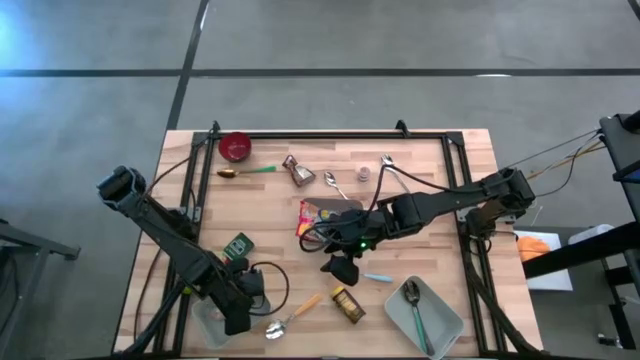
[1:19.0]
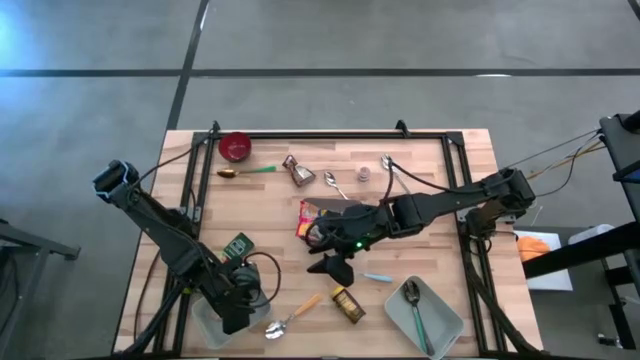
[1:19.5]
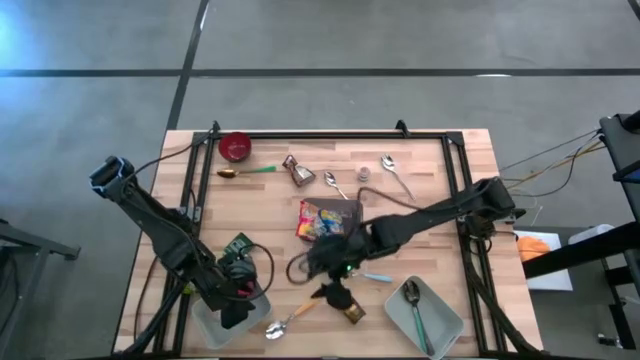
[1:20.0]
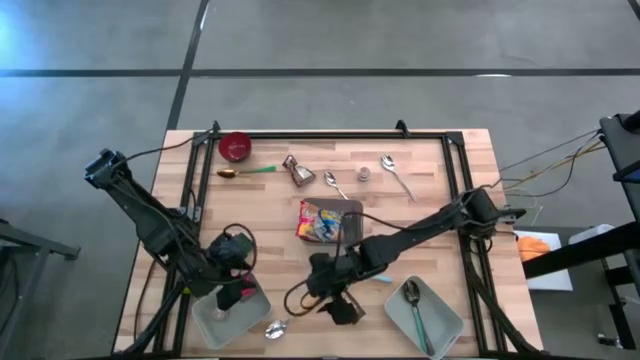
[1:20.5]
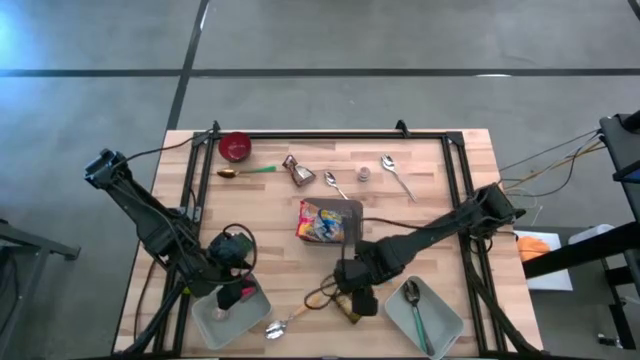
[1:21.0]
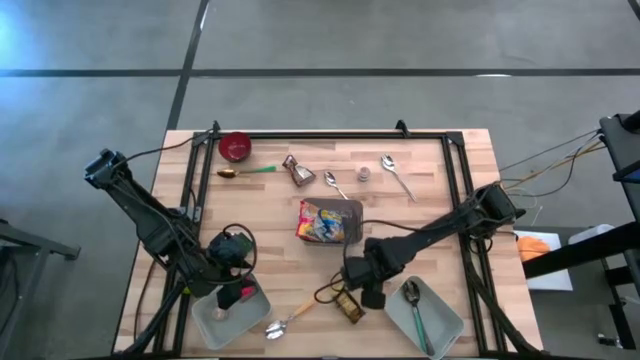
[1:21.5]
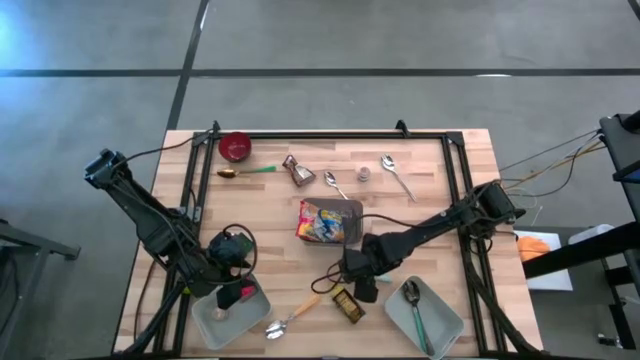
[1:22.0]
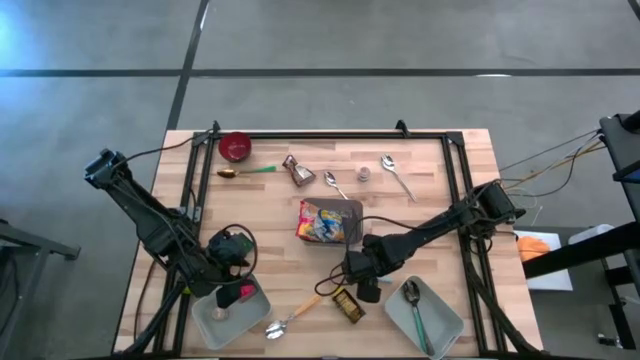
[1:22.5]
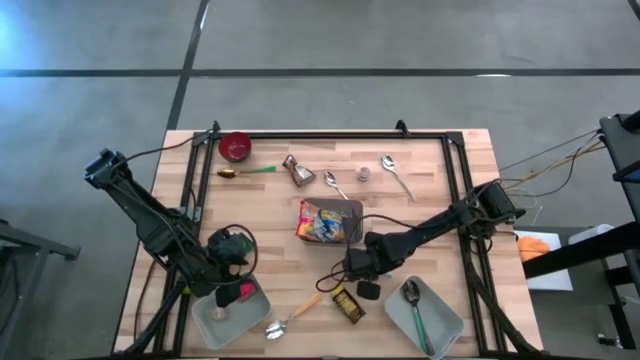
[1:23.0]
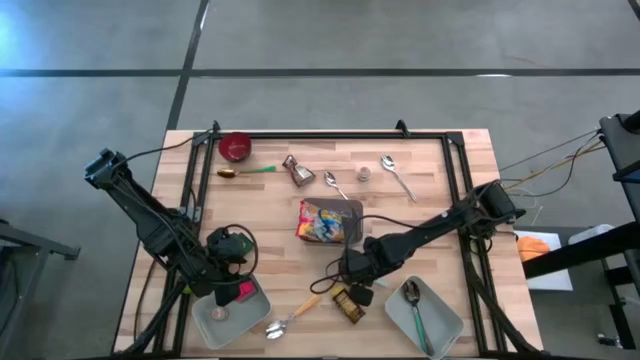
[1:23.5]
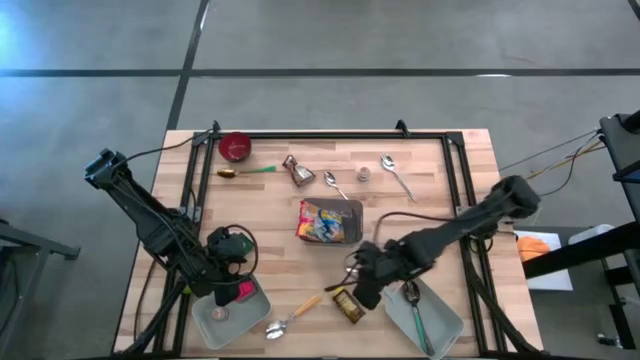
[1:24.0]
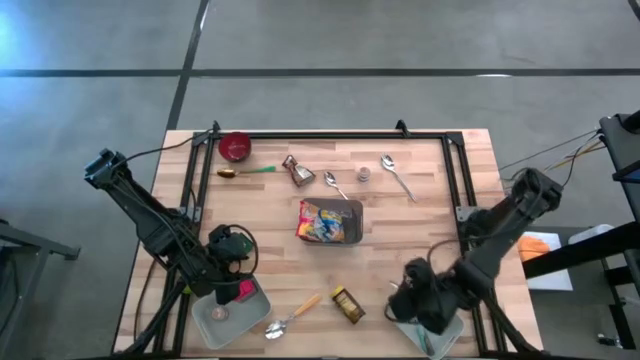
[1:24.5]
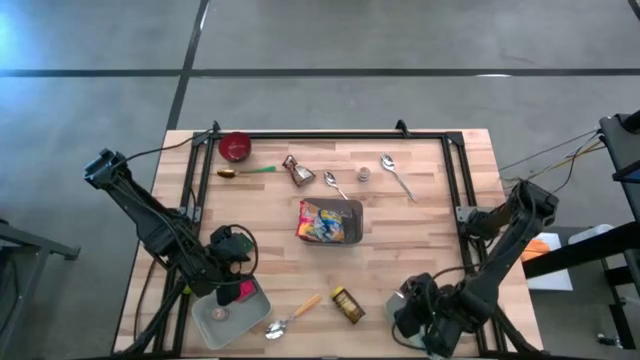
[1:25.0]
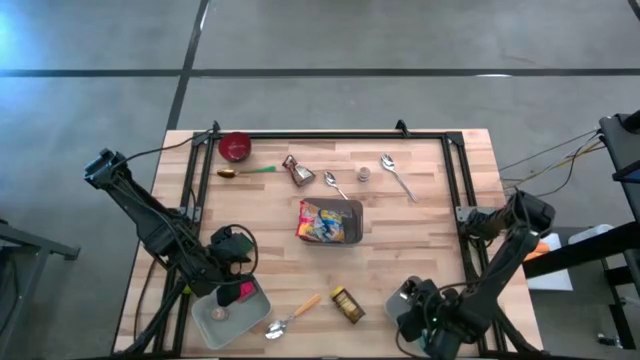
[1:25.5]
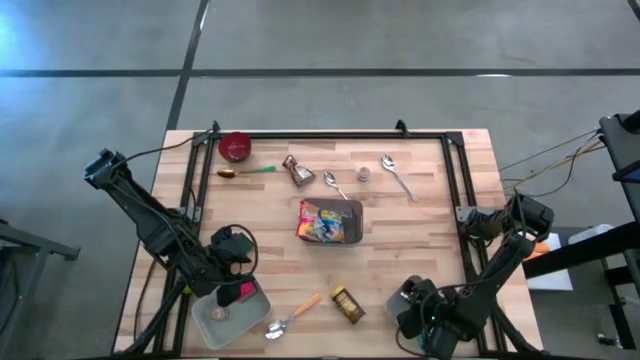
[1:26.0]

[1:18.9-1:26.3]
Put the light blue spoon into the right grey bin

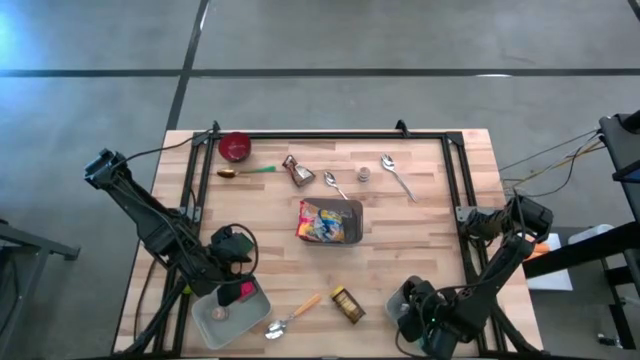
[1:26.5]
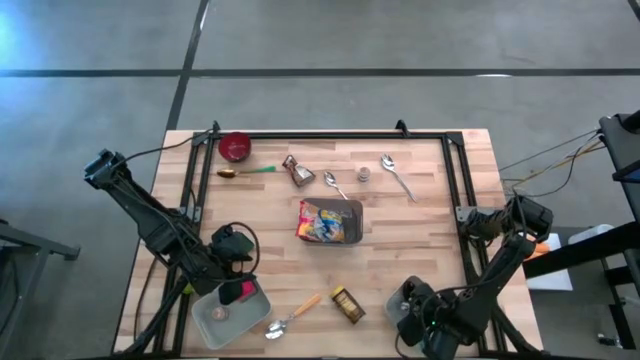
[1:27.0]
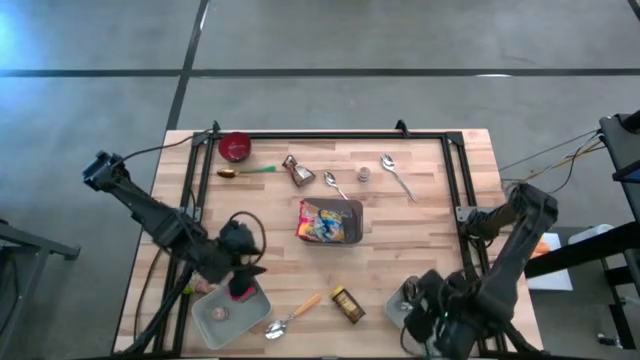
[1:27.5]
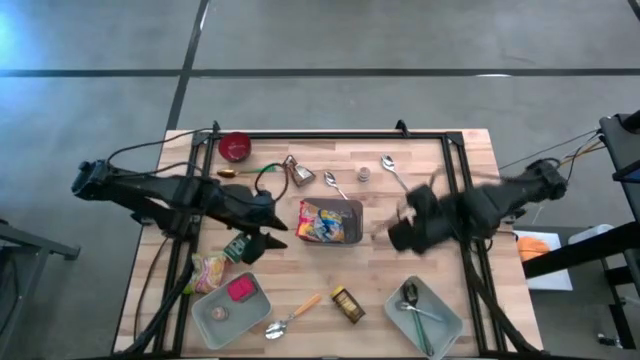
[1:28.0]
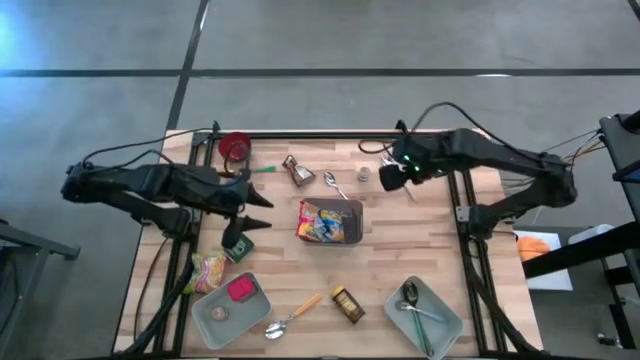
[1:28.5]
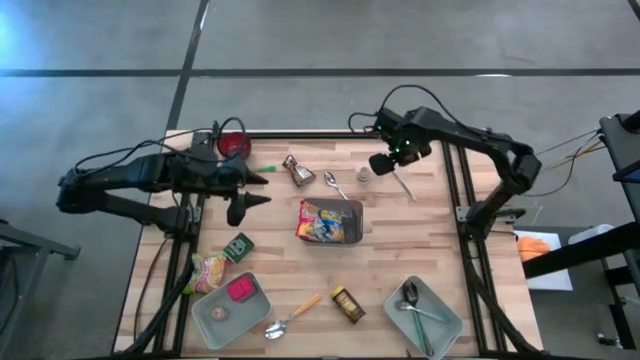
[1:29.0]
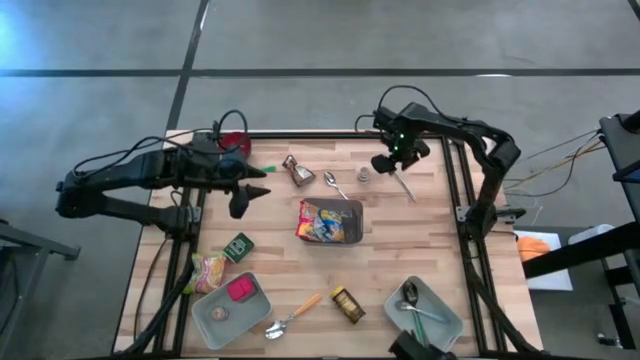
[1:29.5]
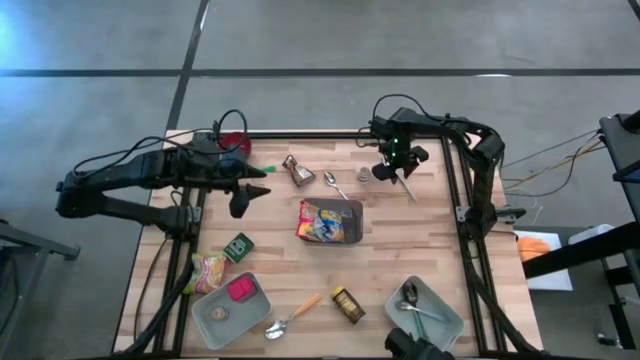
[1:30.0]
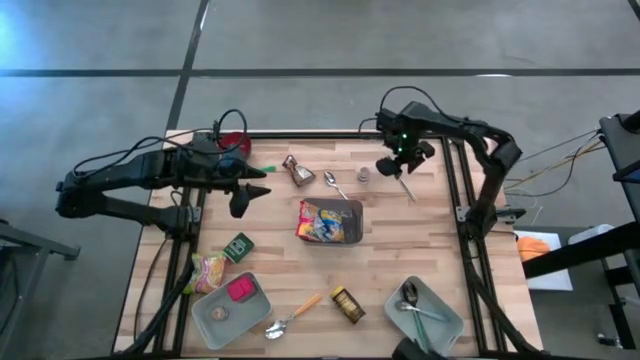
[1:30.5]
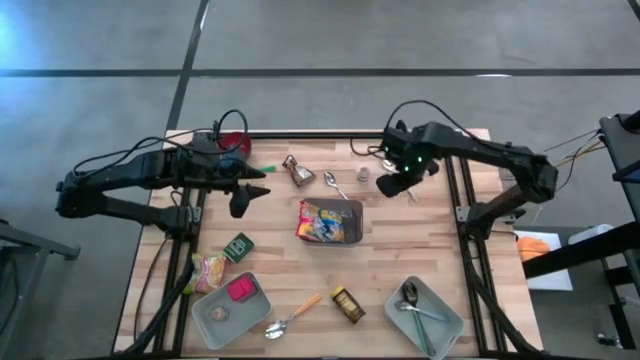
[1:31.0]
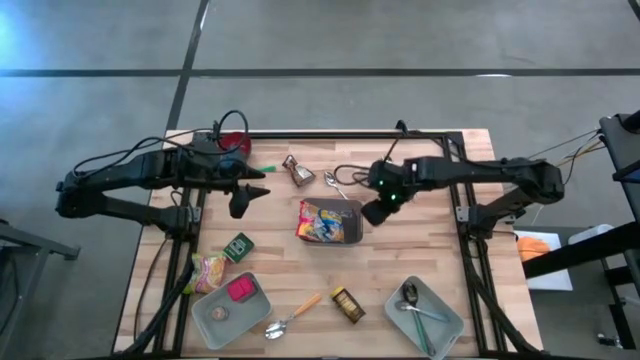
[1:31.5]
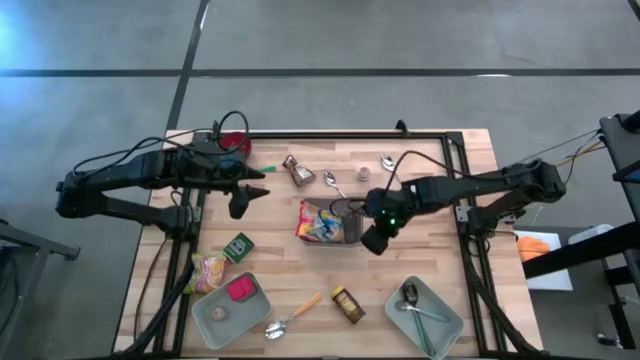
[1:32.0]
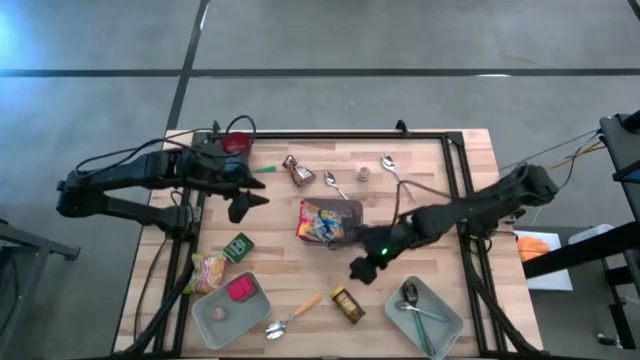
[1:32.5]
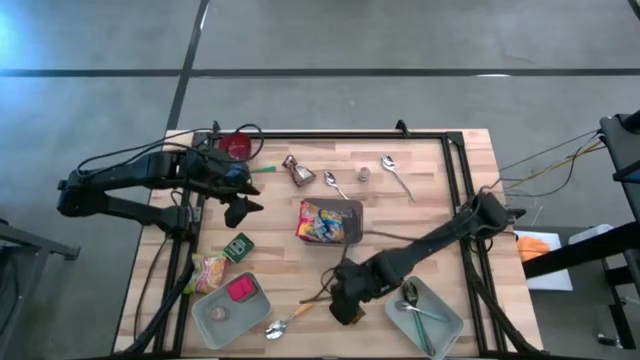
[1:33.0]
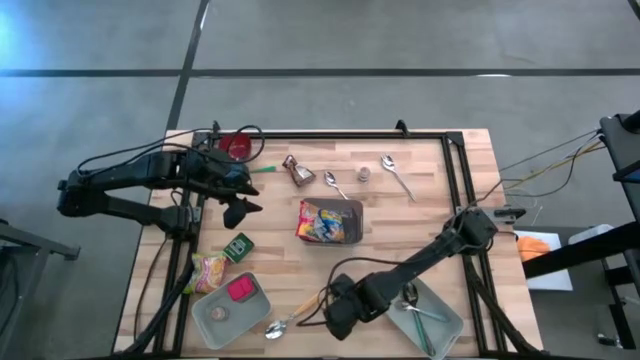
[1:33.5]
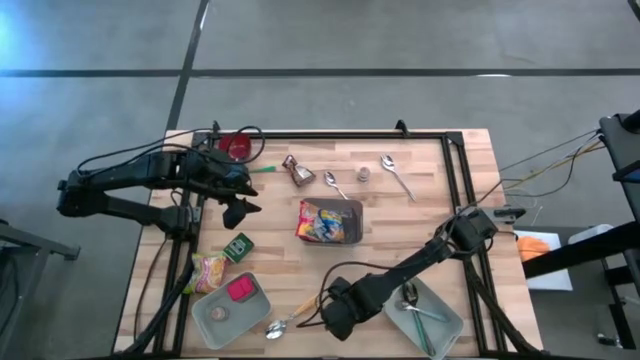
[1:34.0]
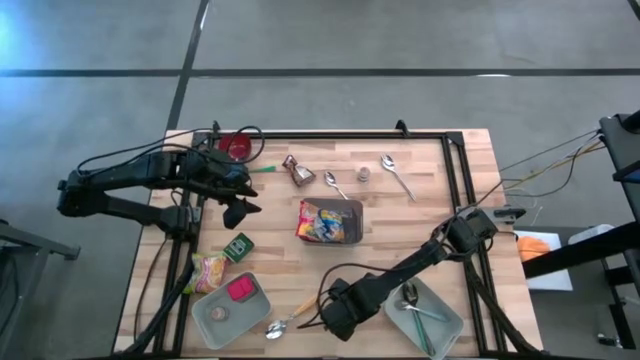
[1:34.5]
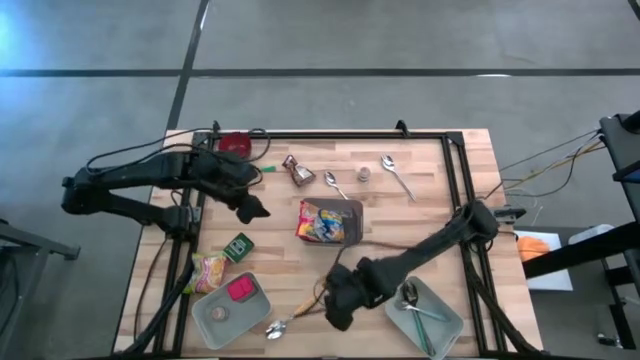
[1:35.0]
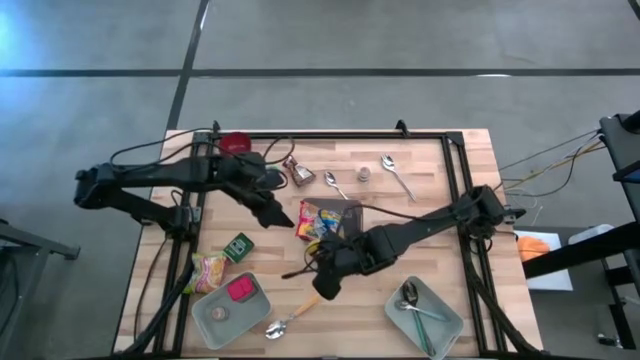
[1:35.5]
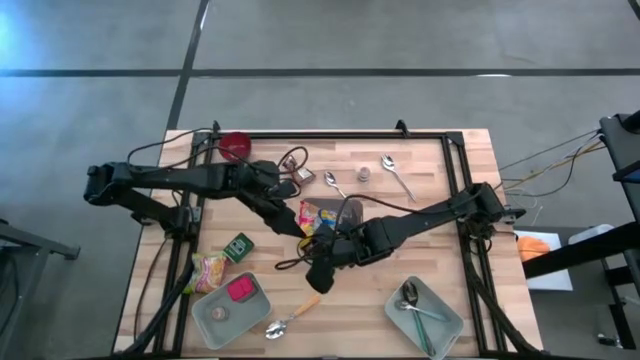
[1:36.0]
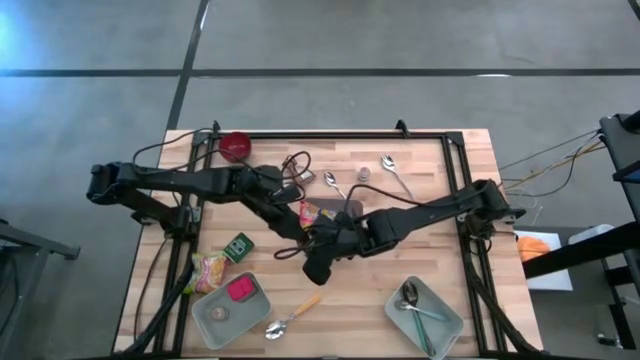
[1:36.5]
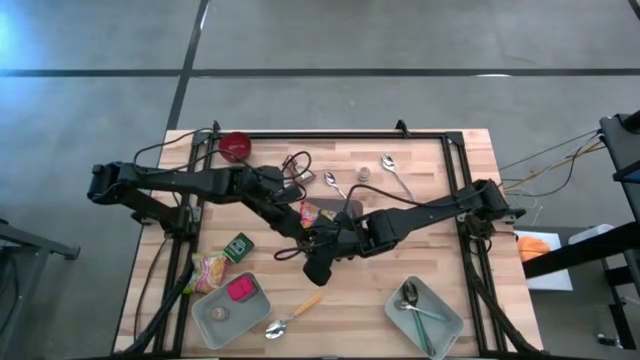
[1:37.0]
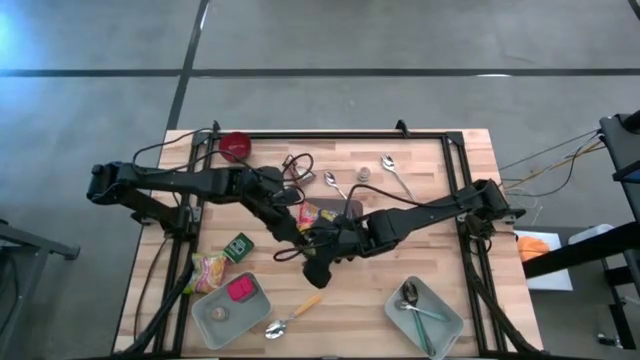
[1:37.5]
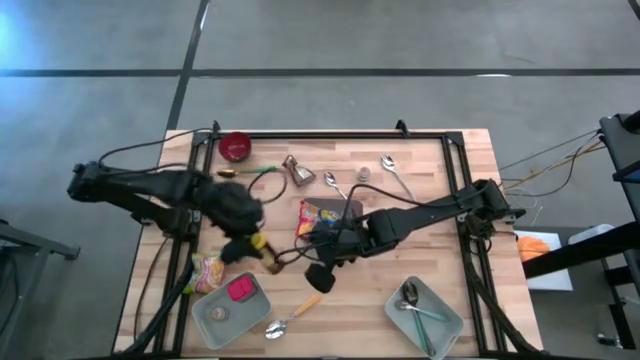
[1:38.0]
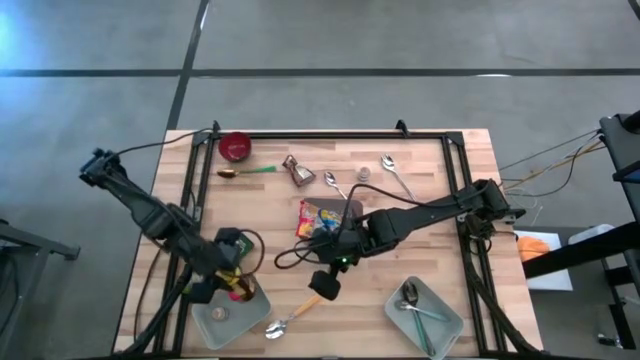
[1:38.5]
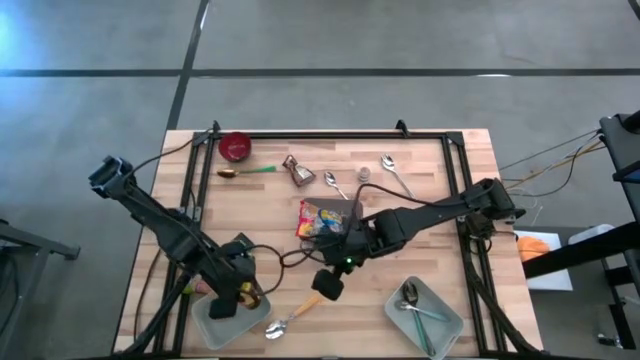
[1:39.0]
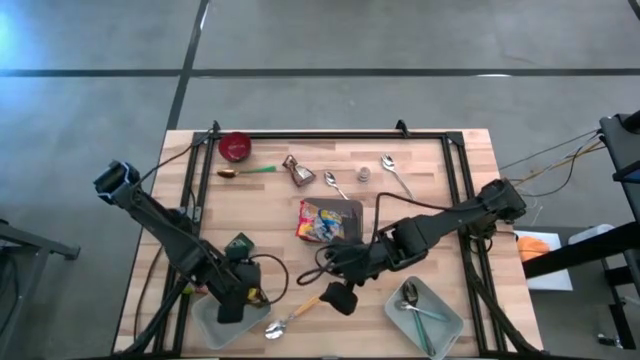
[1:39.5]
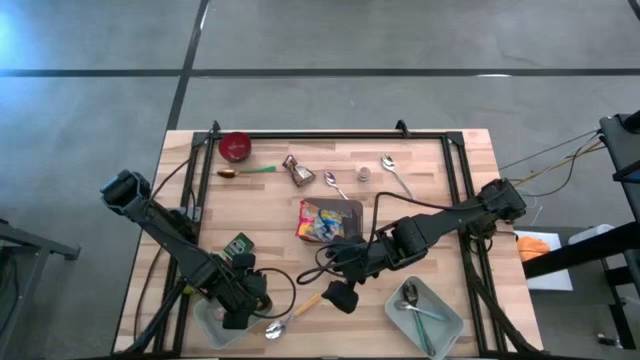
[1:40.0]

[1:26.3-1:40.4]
Put the yellow spice bottle into the left grey bin
